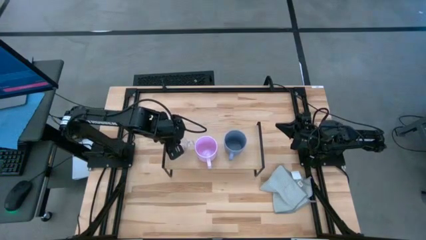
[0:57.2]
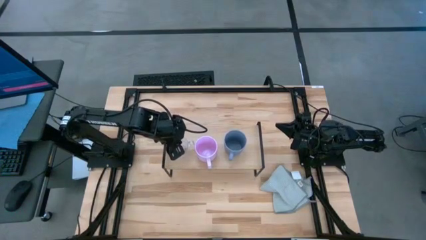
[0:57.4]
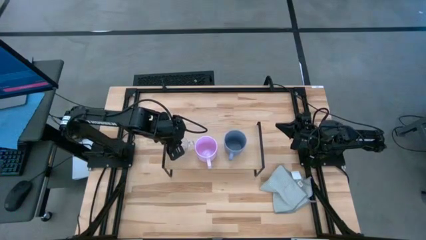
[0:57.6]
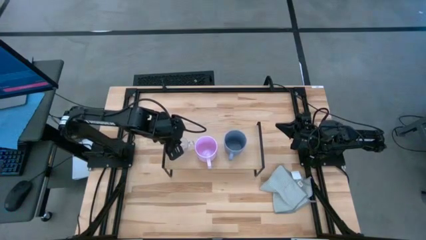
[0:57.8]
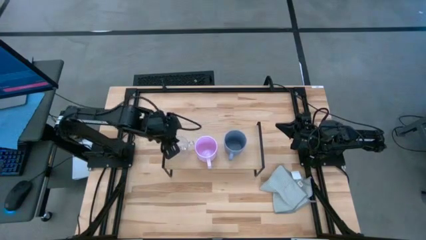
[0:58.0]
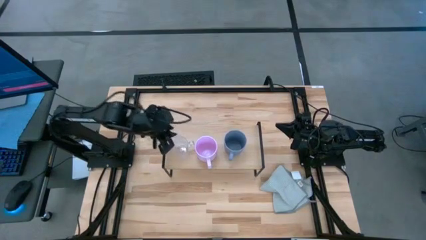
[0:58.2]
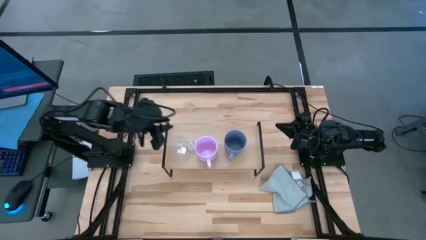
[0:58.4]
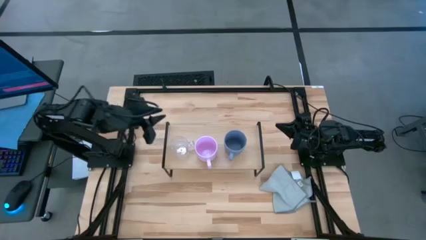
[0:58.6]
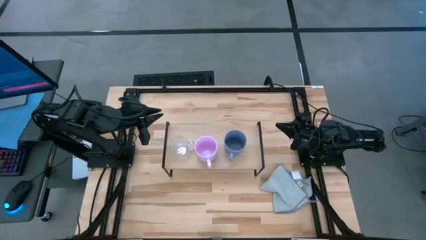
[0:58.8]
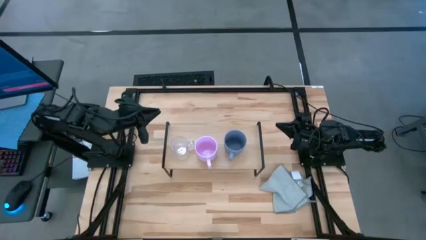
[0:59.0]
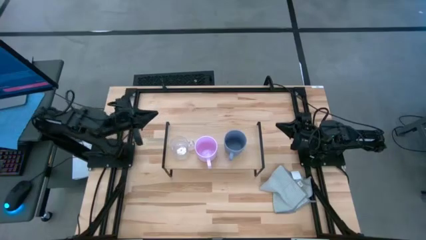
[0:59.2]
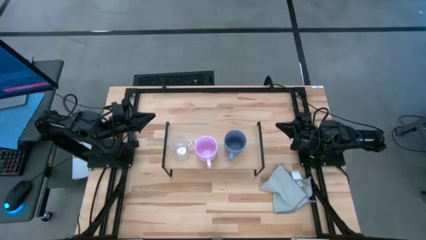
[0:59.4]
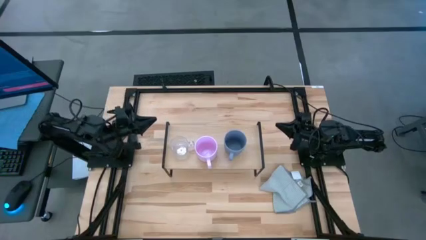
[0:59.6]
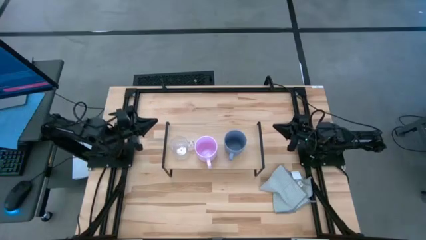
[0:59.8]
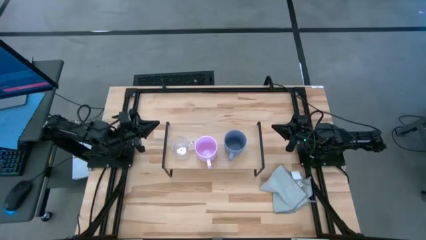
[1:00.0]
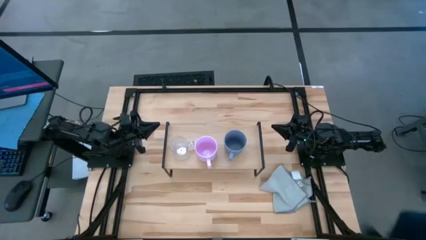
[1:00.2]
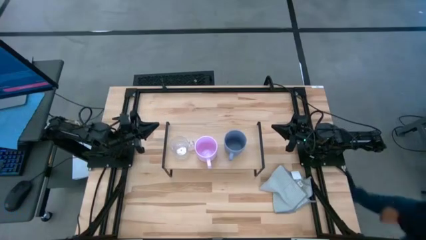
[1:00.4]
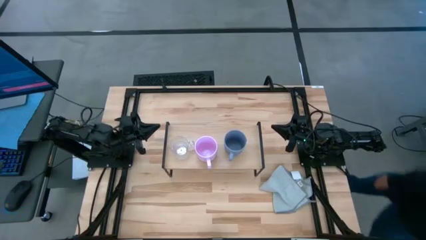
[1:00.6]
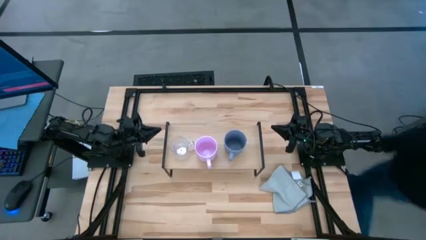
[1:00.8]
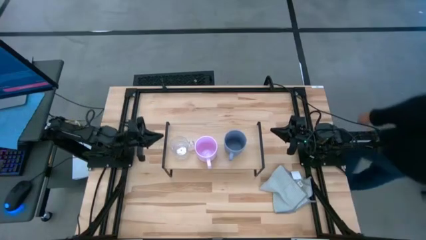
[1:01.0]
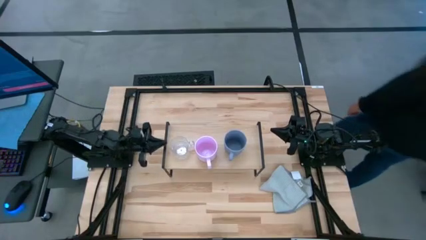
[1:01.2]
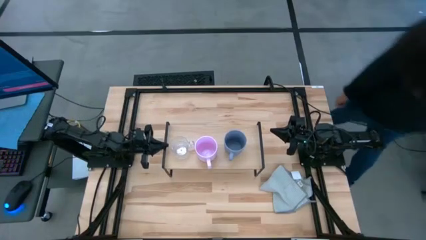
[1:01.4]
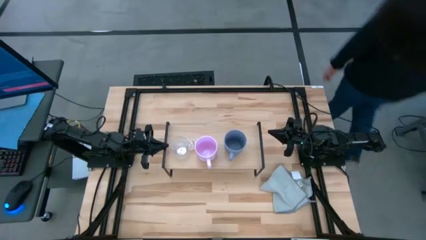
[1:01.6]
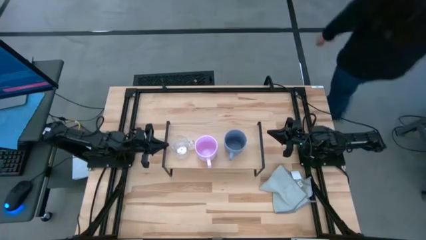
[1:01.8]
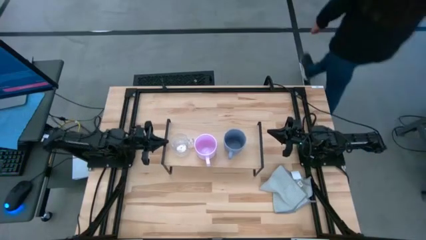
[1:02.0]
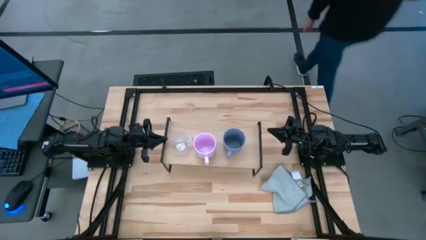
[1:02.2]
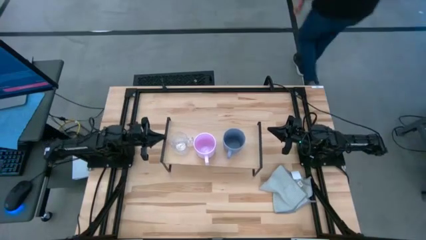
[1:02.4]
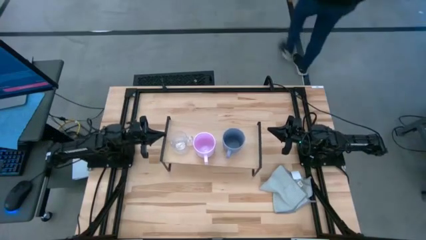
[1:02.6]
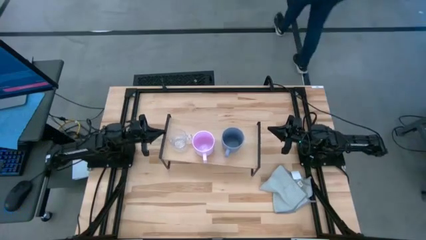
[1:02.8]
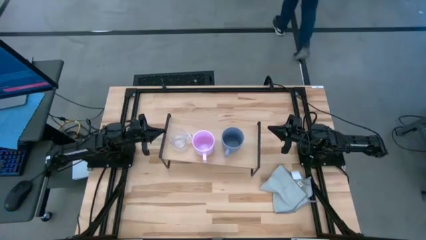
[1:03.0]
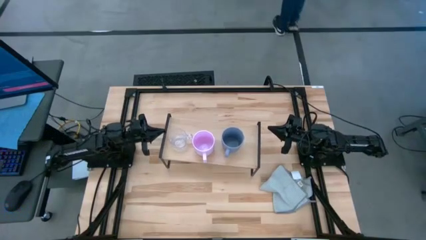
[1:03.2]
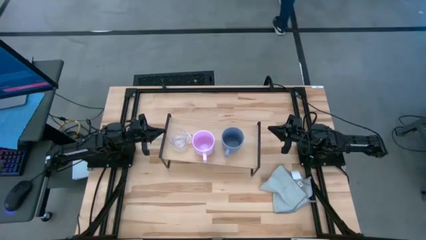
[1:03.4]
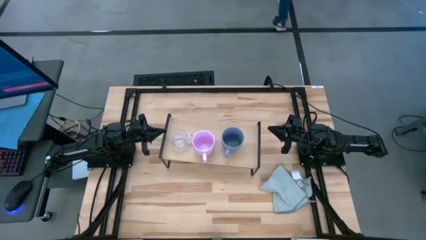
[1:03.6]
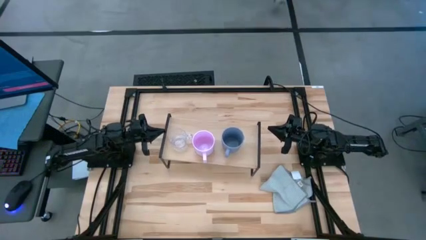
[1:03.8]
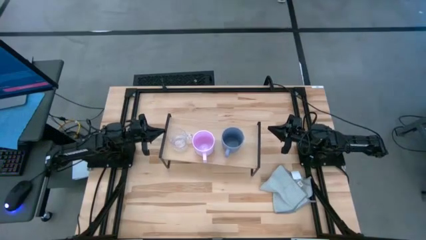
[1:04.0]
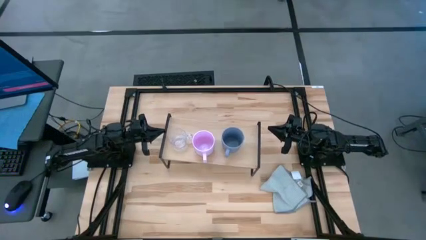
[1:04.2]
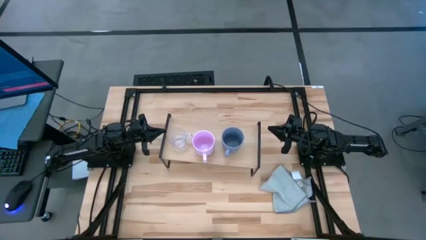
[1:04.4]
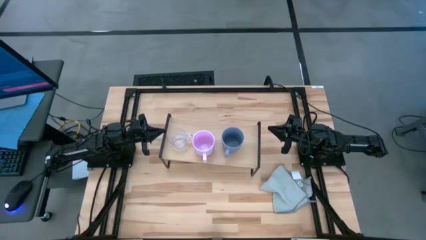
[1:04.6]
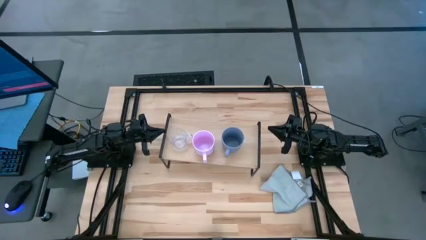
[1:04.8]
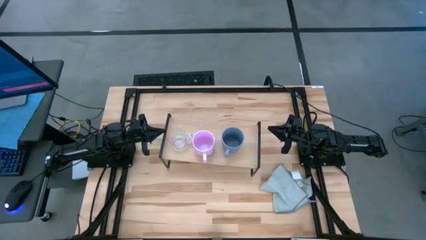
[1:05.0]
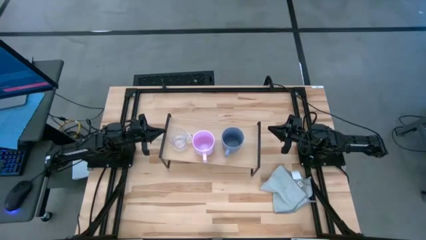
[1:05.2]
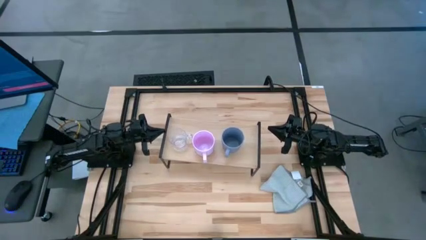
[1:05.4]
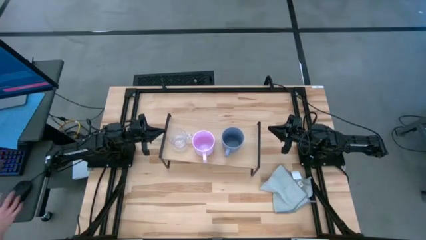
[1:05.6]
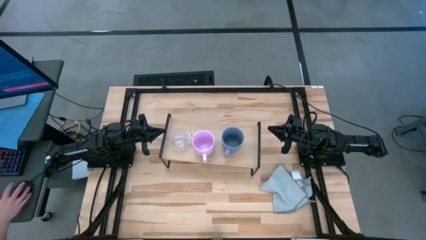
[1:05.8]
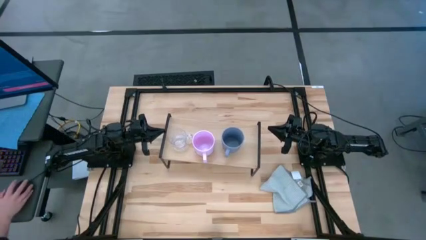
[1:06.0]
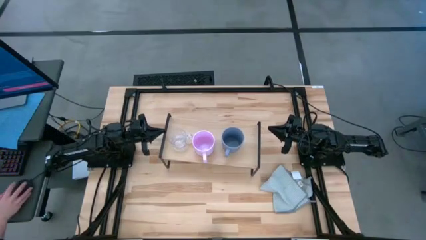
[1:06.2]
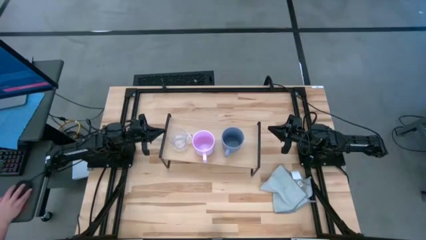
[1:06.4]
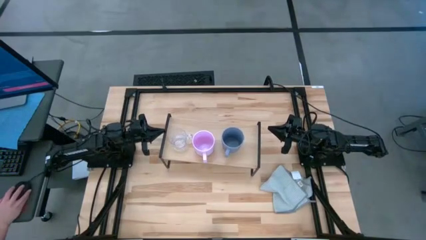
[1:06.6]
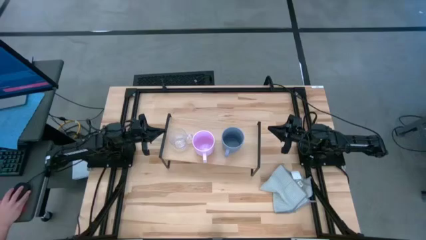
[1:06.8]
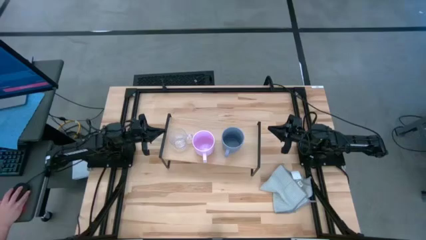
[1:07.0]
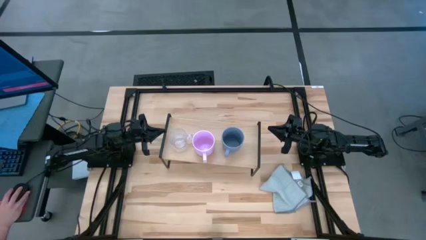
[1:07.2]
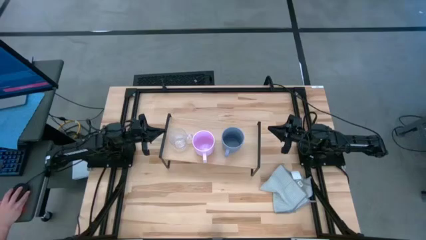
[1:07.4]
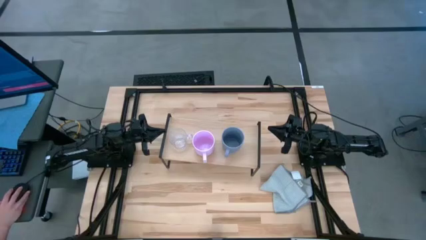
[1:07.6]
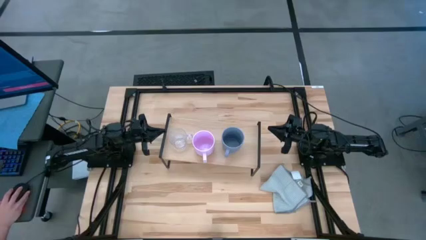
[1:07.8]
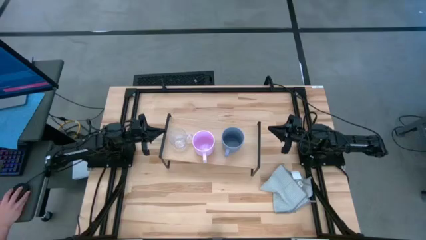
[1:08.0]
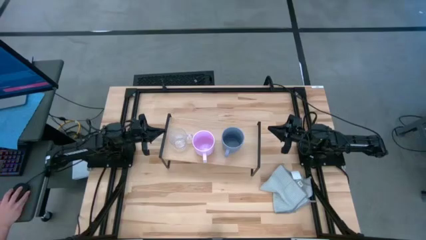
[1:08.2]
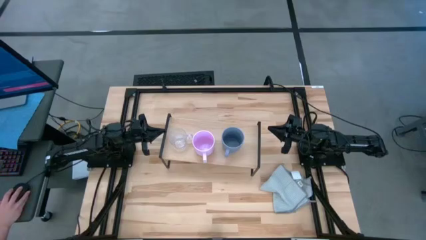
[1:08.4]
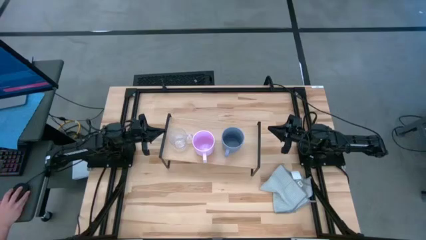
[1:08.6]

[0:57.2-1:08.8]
Task: Stack small to large cups/mugs on shelf
Return to Home Position
